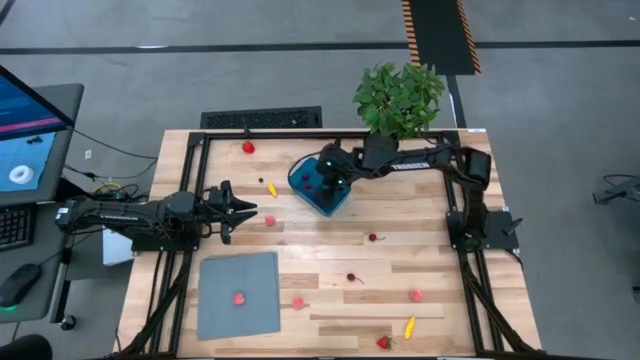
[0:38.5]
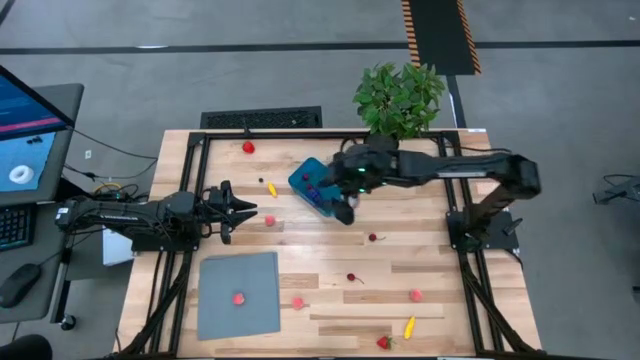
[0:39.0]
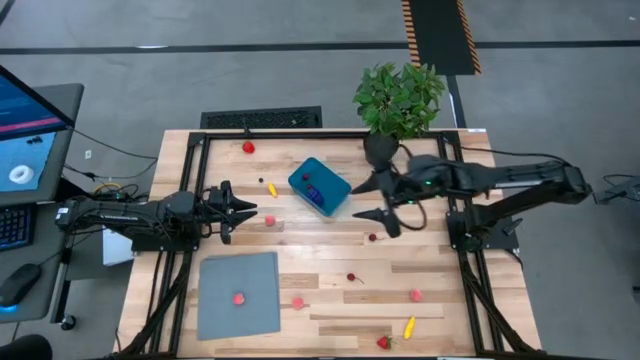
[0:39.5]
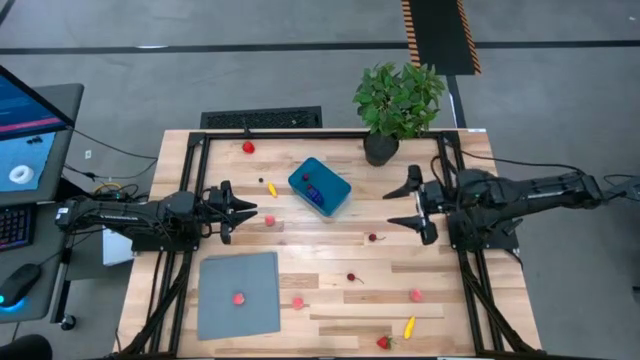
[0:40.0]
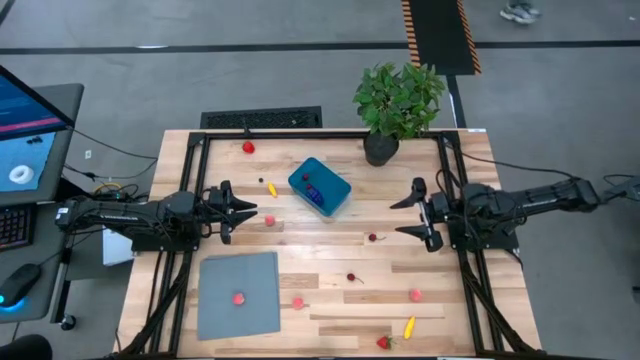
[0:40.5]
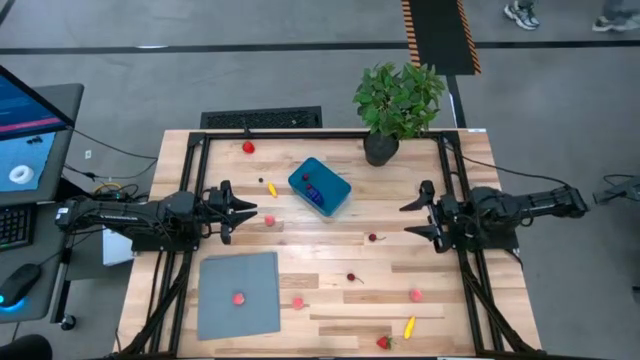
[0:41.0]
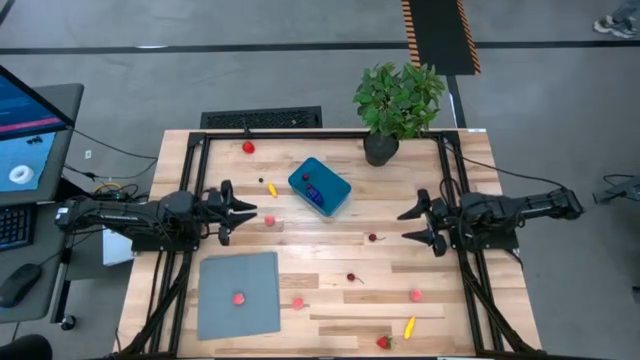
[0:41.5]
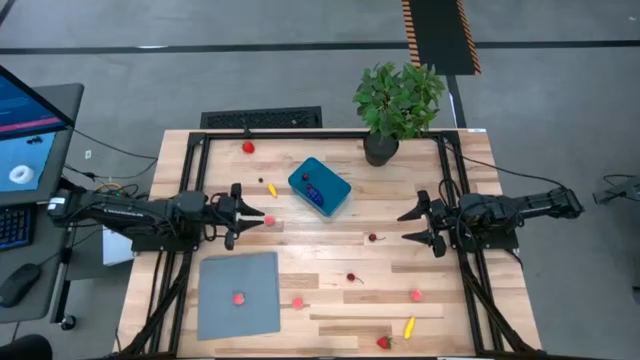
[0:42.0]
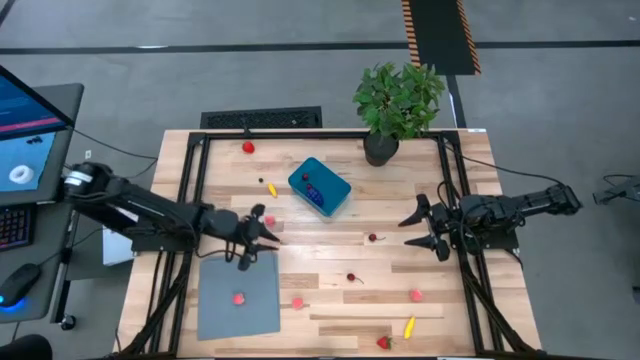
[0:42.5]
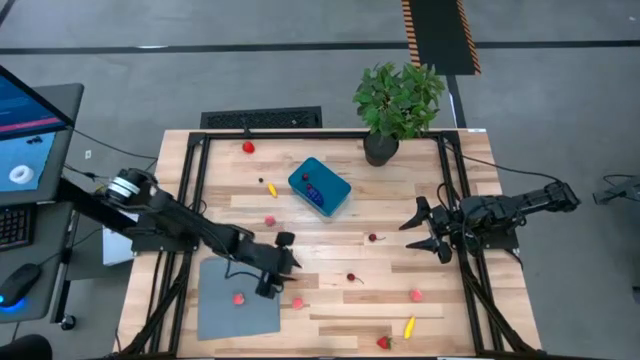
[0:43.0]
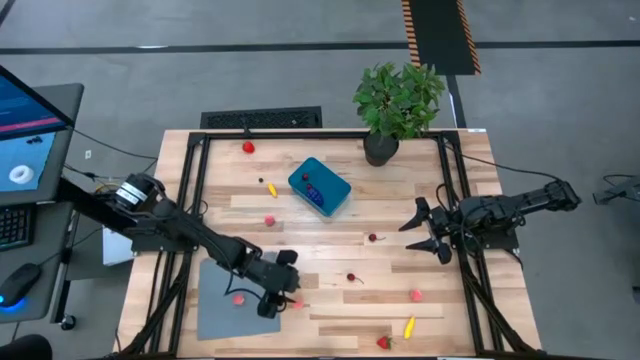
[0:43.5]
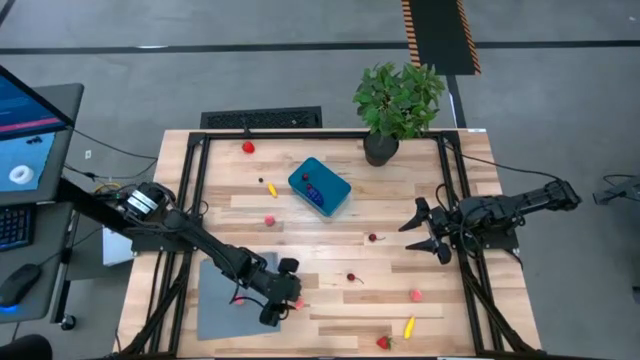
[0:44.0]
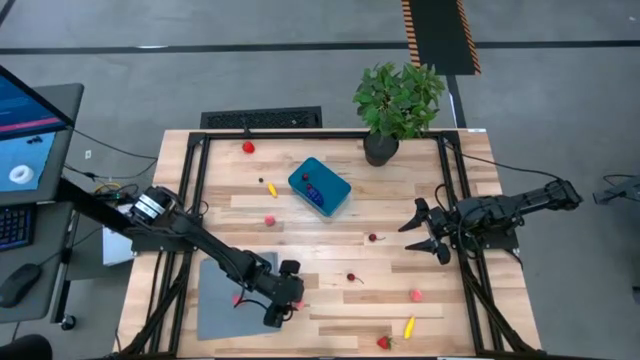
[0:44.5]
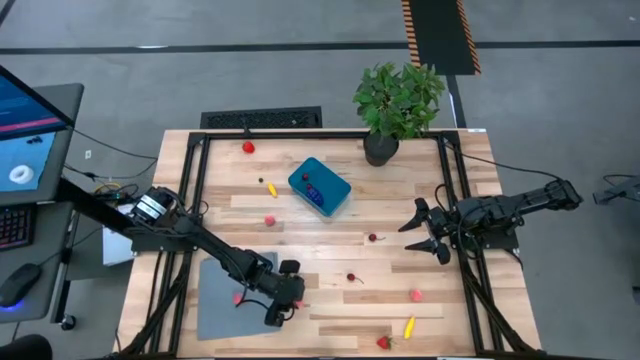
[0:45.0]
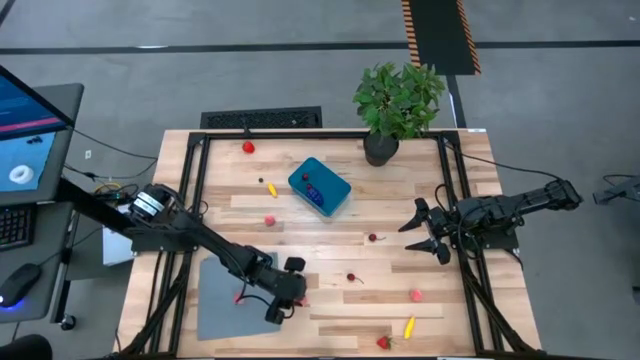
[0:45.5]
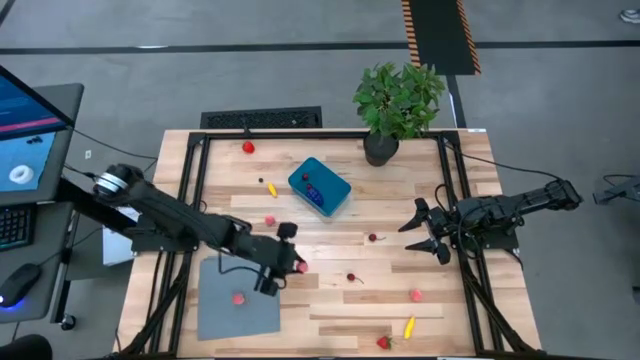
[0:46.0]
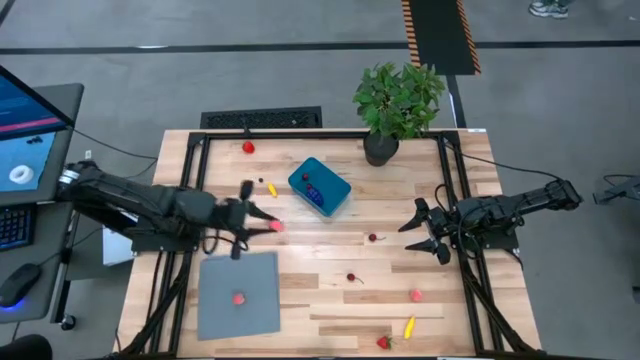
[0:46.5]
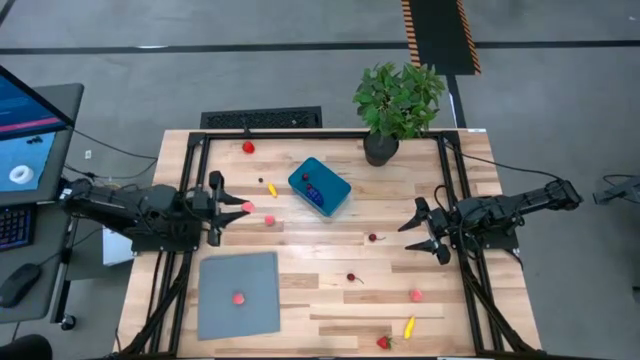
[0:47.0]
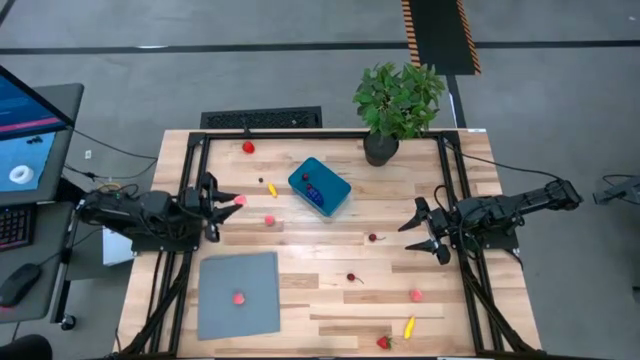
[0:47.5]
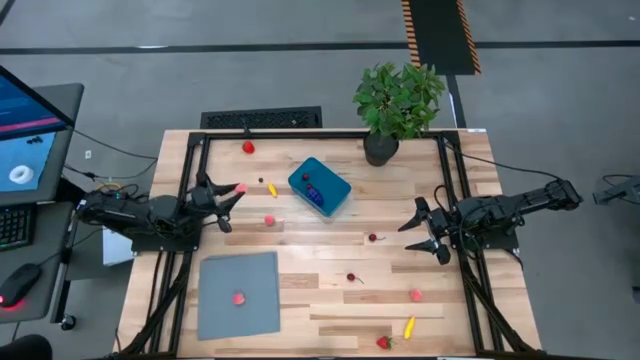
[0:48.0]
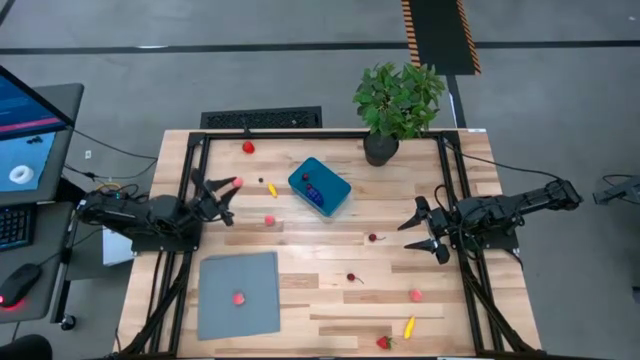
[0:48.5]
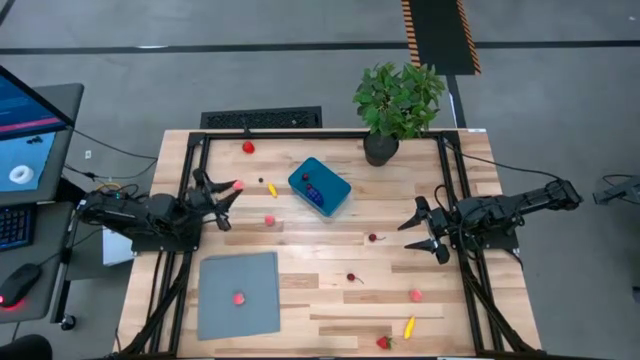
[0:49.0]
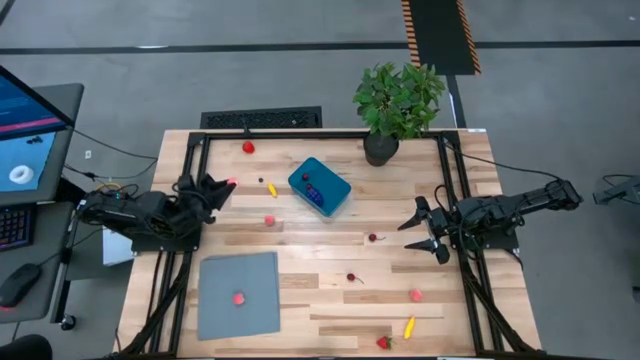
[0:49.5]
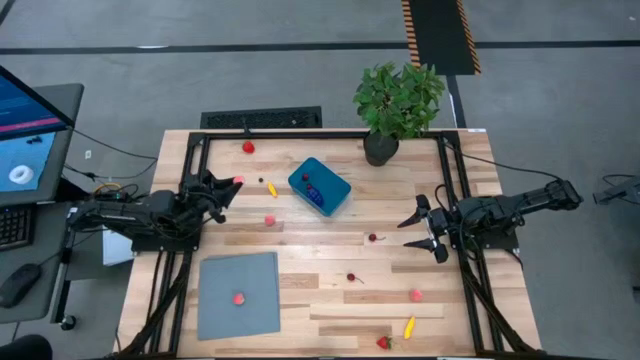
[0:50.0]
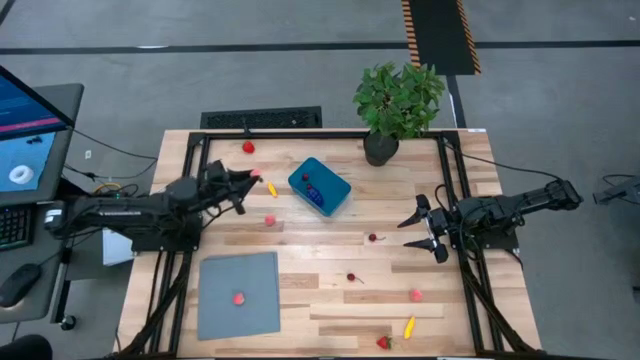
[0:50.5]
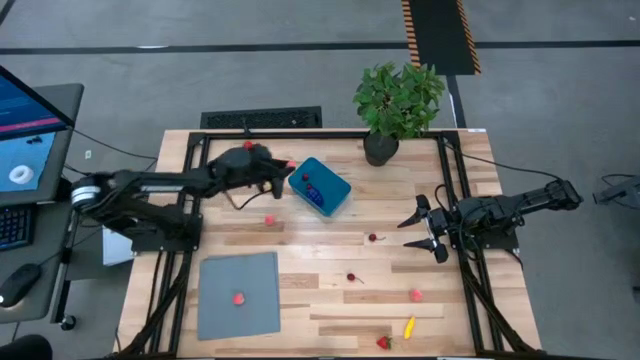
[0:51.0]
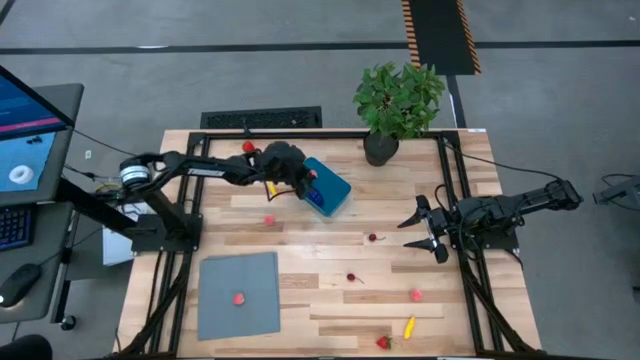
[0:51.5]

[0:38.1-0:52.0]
Task: Pick and placing Produce into tupperware
Put the apricot into the container

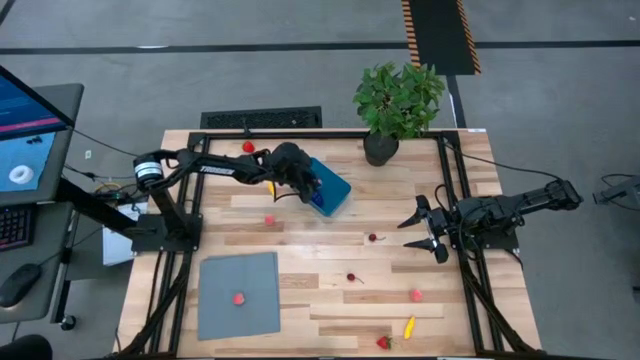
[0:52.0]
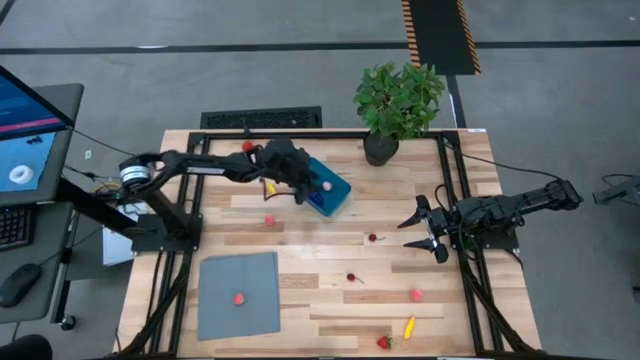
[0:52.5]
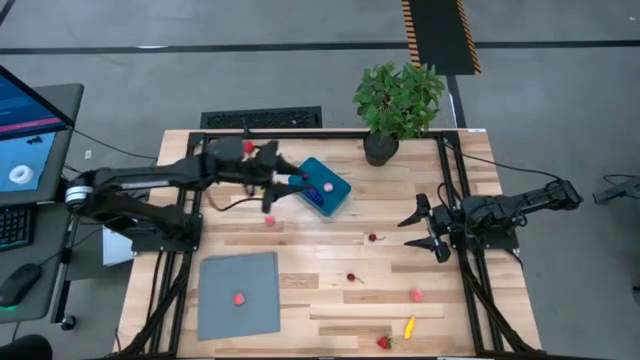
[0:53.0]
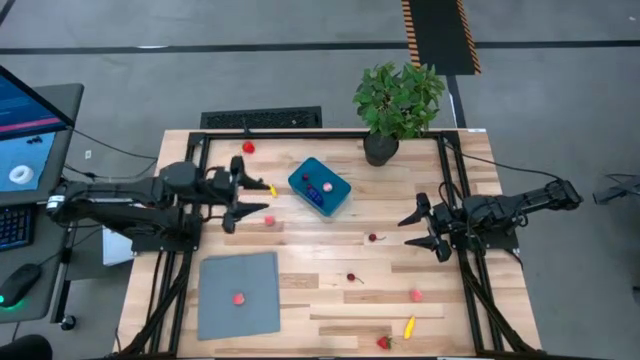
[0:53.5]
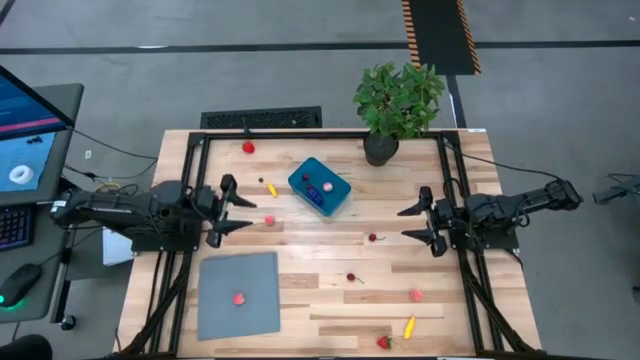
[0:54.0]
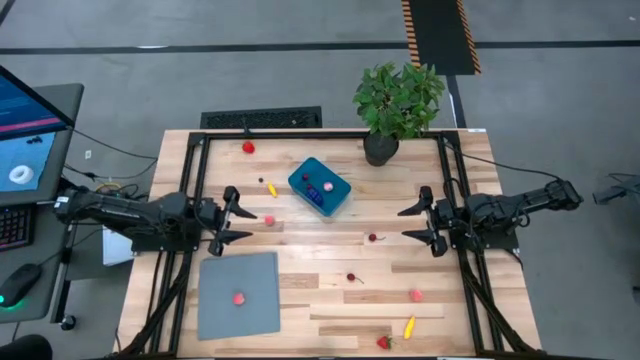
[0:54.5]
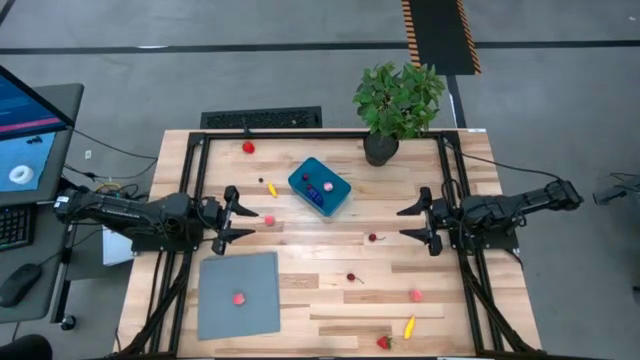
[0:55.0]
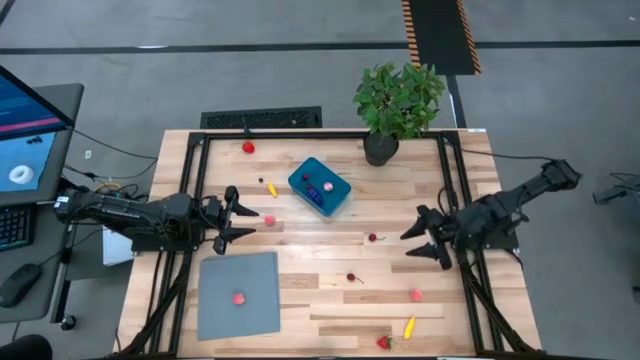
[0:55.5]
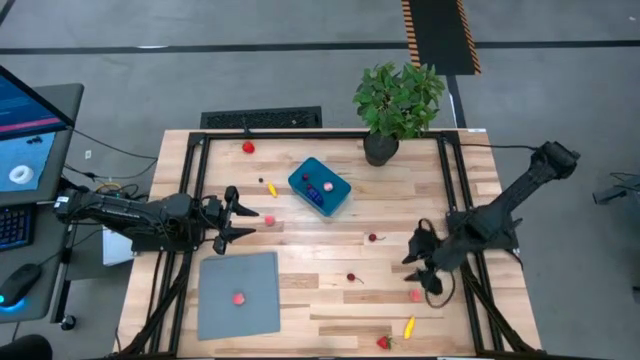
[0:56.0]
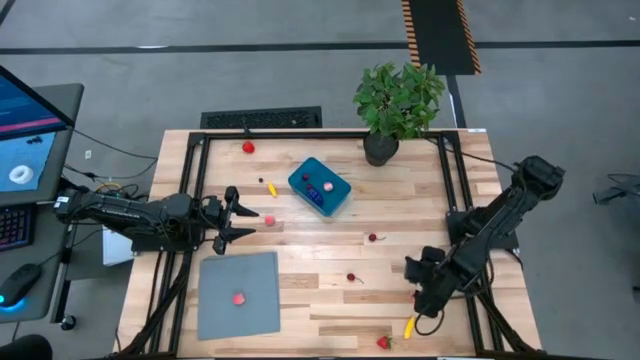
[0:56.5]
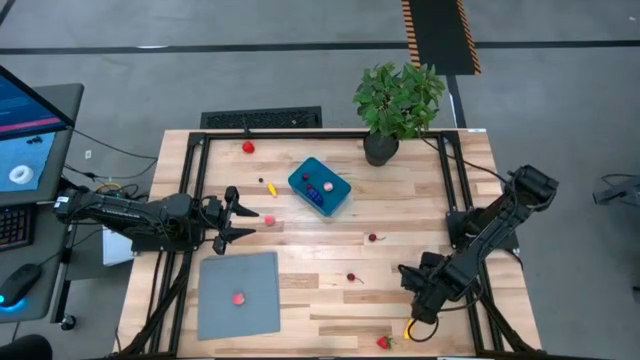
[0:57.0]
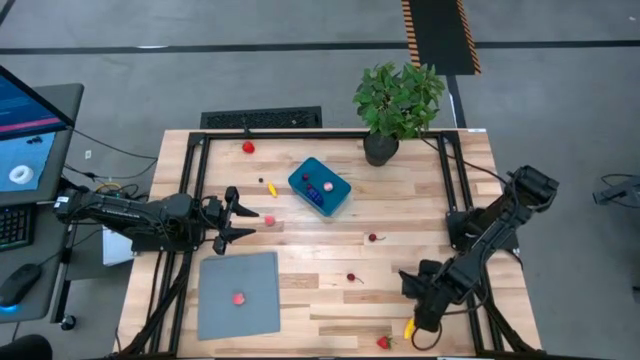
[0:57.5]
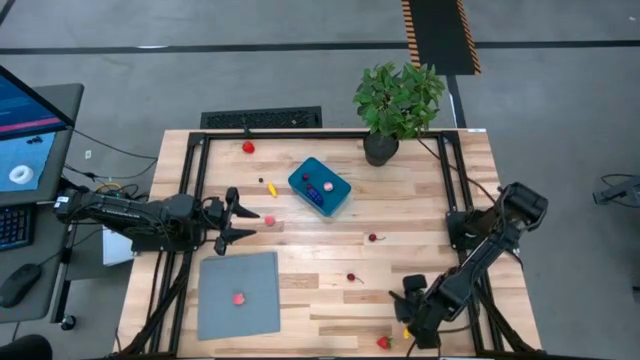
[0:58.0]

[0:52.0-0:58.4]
Put the bottom cherry into the container
